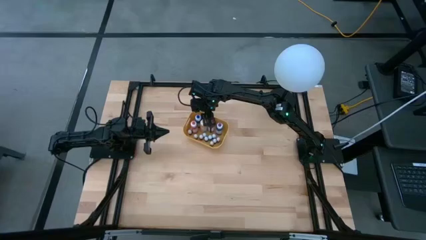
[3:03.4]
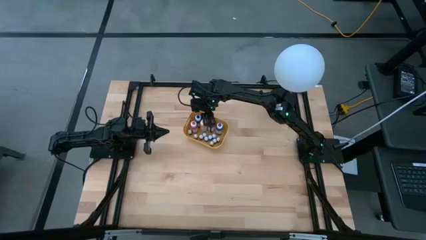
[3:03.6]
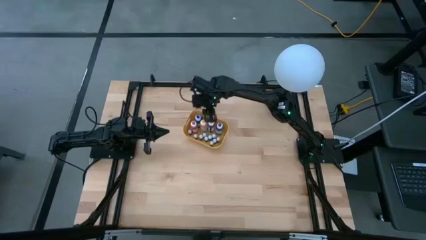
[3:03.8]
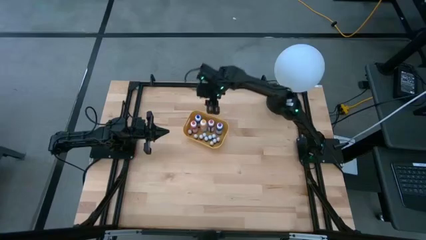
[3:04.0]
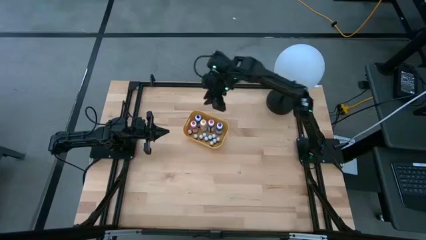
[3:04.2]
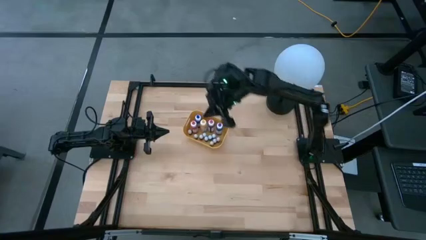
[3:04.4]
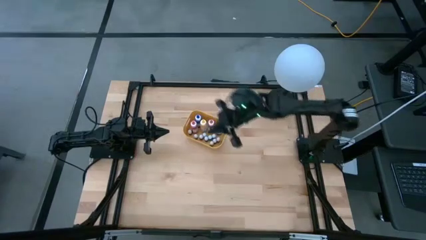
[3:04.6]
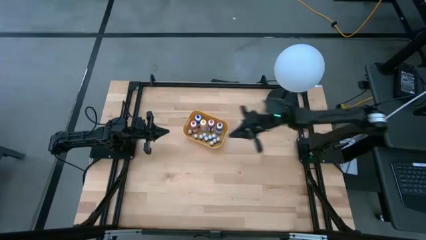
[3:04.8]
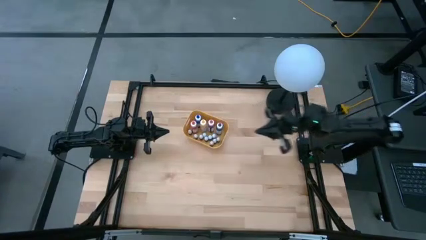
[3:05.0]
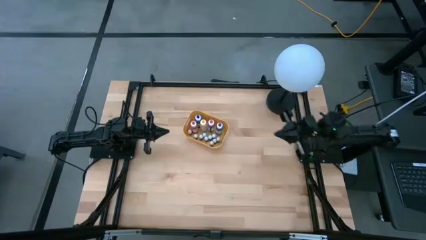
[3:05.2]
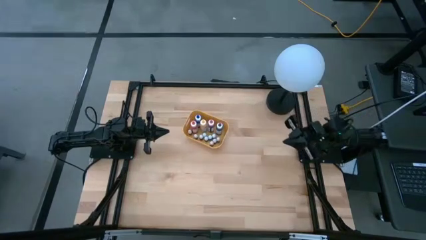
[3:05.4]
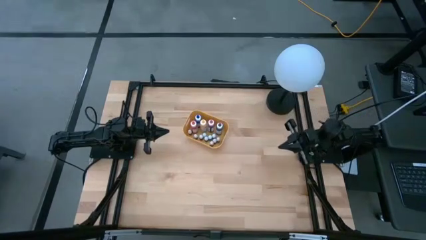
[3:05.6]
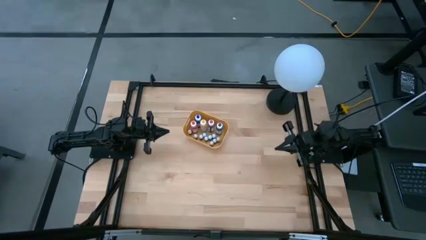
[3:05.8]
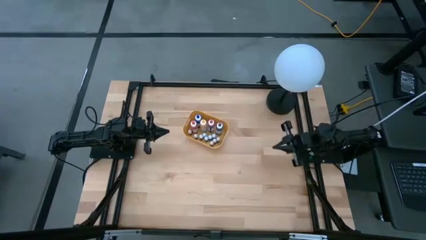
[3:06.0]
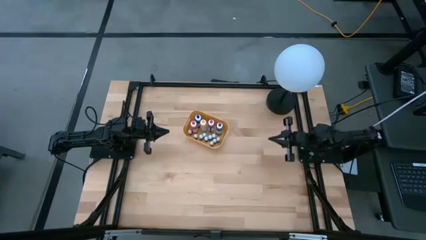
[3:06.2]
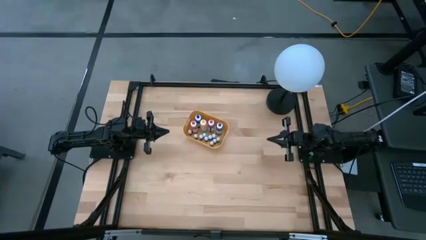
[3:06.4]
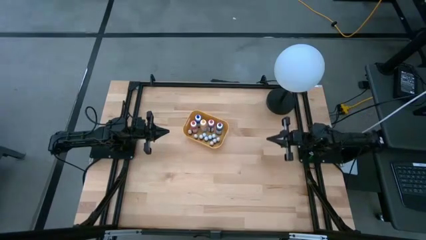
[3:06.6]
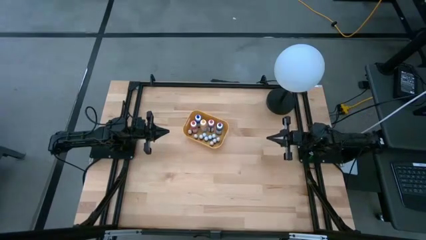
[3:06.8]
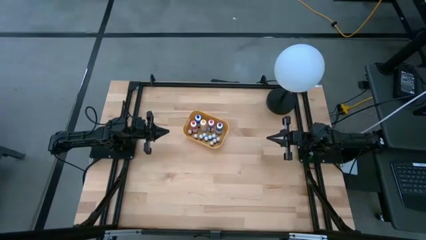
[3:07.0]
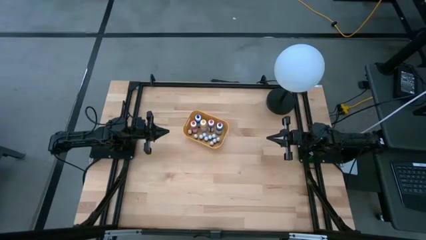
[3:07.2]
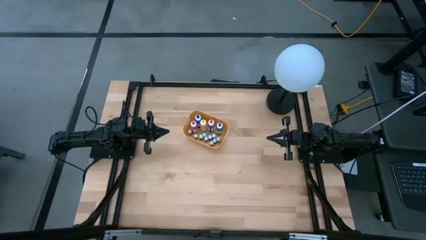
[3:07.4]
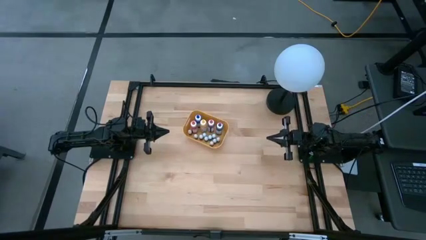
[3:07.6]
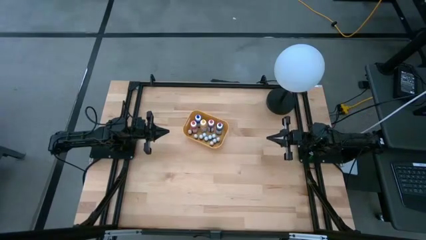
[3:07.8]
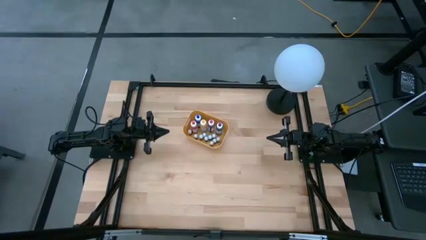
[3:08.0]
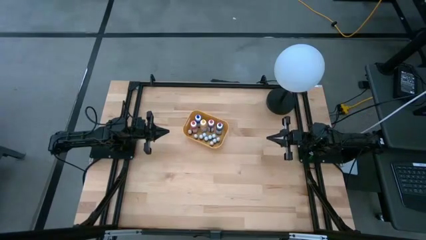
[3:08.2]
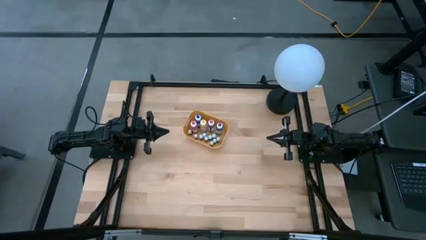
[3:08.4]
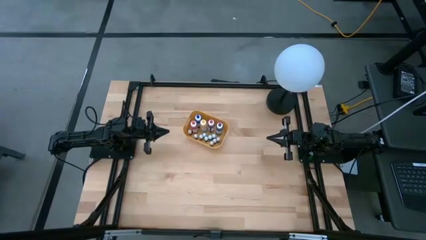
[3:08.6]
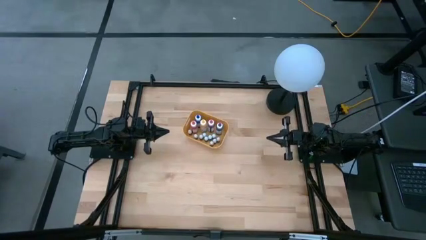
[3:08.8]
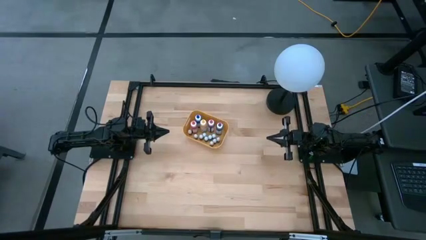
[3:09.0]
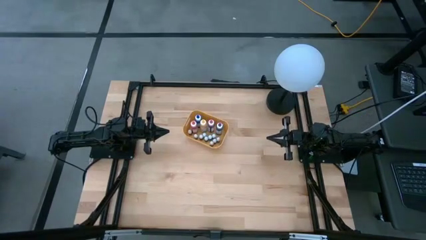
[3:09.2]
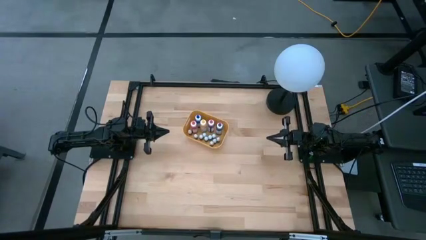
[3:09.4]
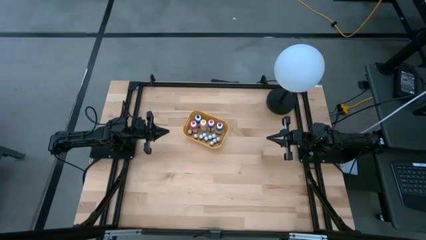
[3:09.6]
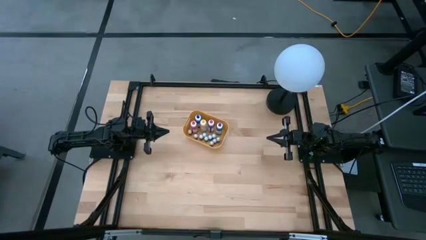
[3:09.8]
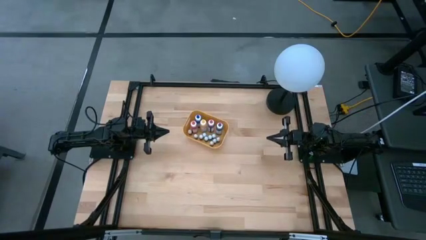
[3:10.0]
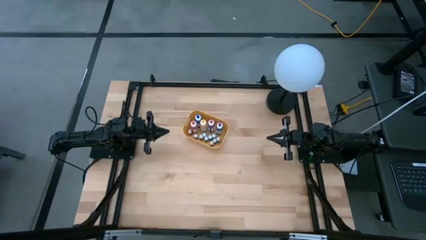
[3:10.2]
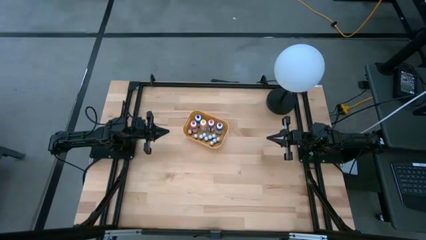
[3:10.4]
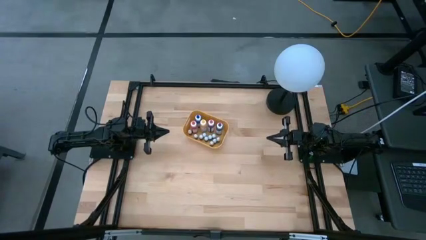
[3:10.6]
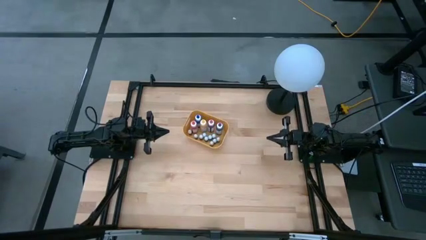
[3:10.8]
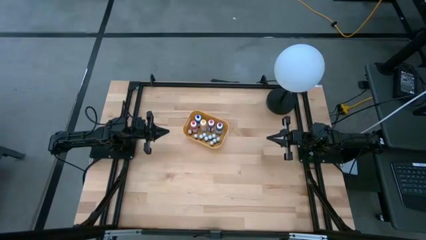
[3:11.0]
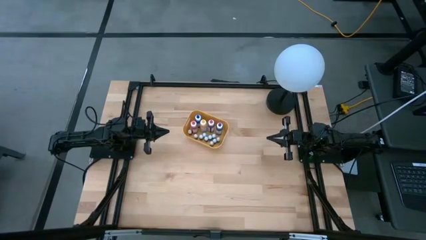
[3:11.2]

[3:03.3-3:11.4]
Task: Pick & Place food coloring
Return to Home Position

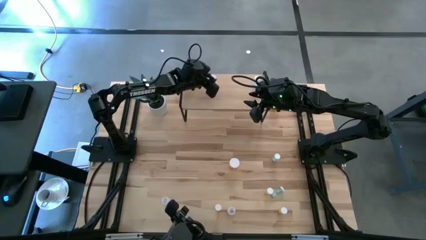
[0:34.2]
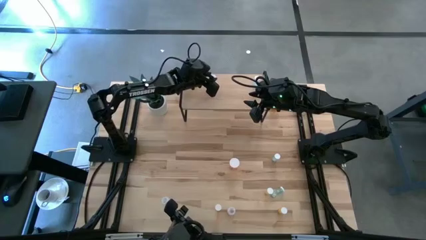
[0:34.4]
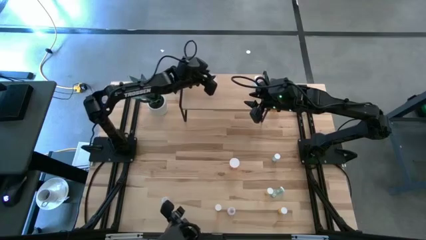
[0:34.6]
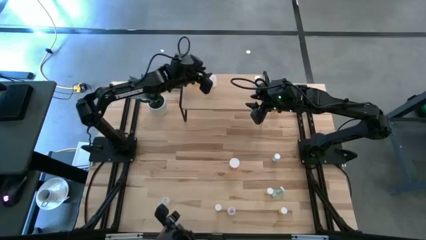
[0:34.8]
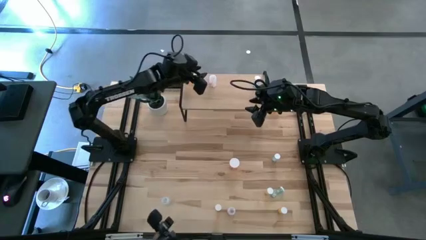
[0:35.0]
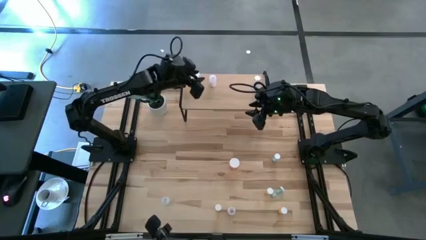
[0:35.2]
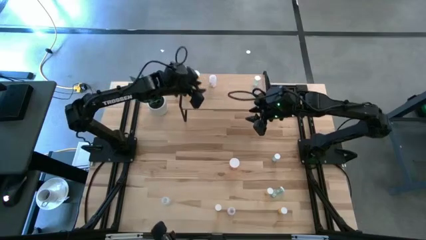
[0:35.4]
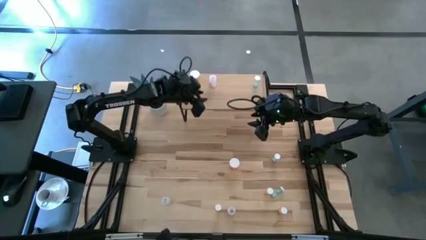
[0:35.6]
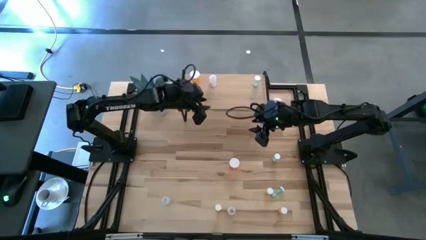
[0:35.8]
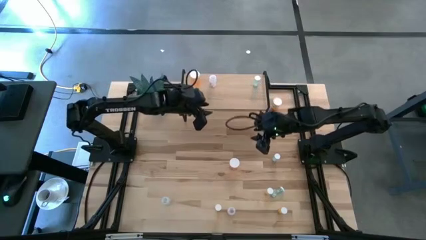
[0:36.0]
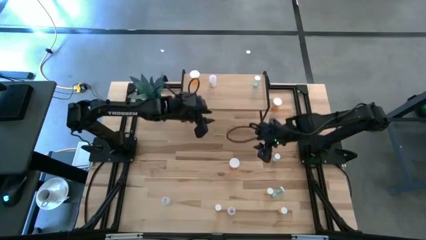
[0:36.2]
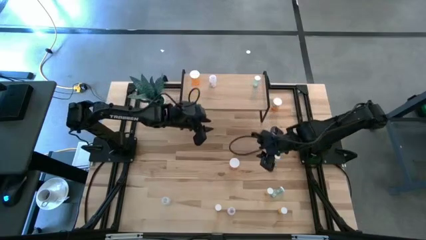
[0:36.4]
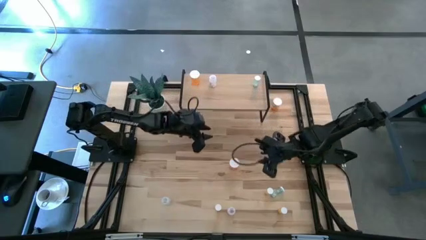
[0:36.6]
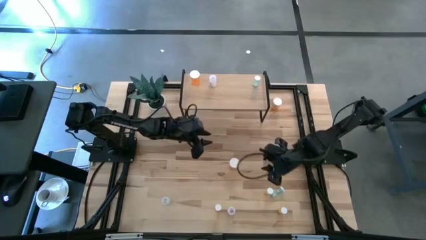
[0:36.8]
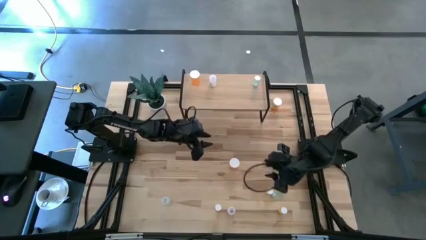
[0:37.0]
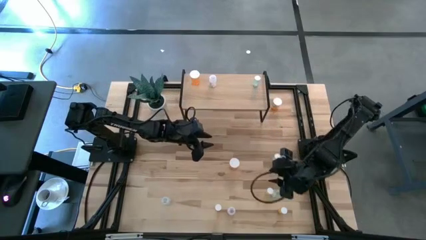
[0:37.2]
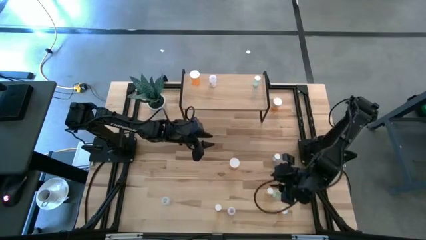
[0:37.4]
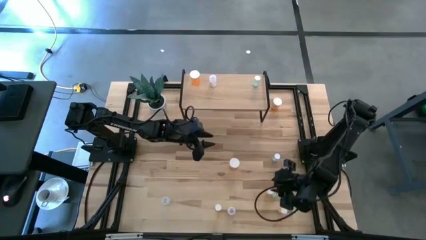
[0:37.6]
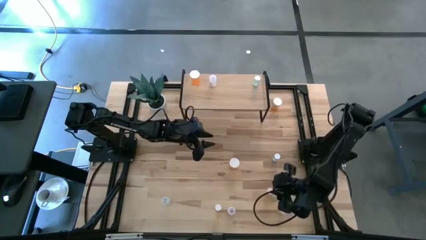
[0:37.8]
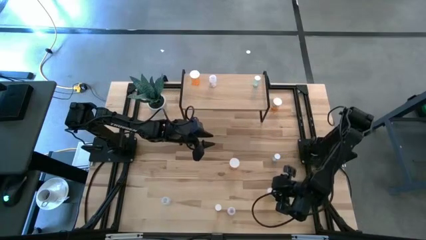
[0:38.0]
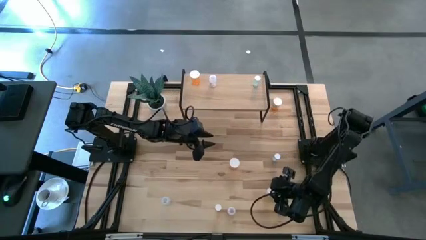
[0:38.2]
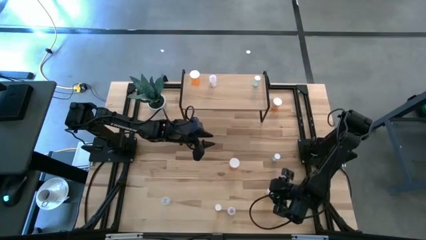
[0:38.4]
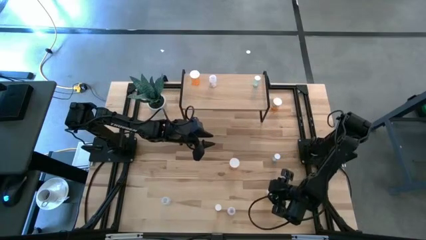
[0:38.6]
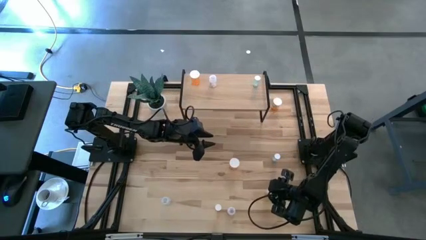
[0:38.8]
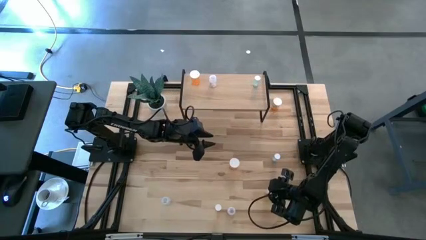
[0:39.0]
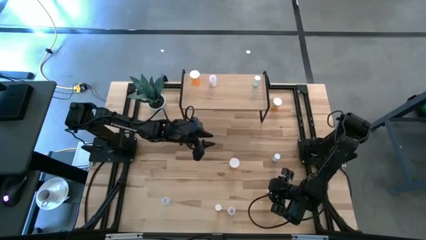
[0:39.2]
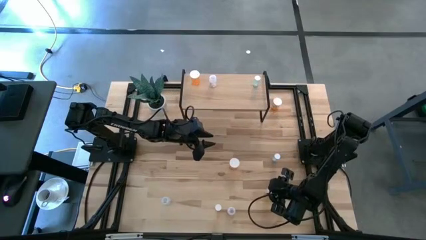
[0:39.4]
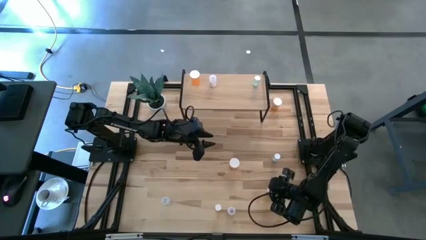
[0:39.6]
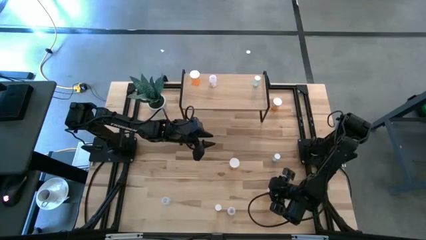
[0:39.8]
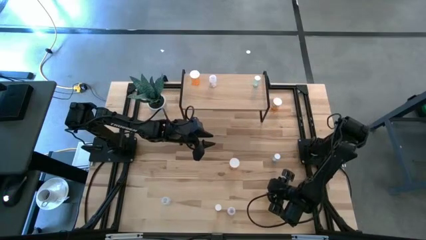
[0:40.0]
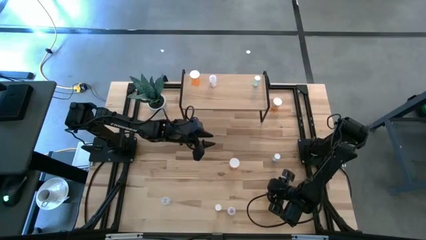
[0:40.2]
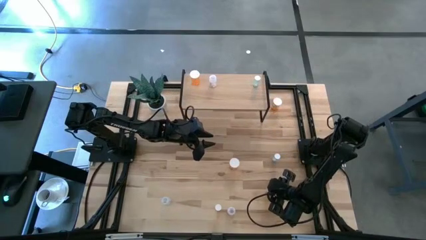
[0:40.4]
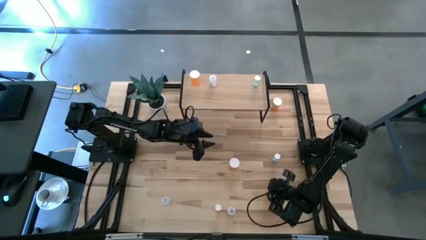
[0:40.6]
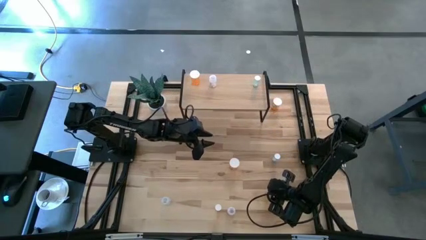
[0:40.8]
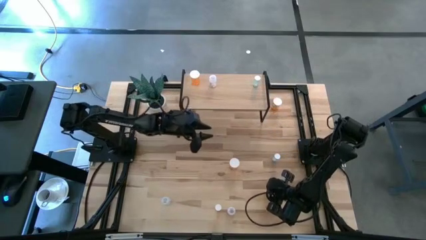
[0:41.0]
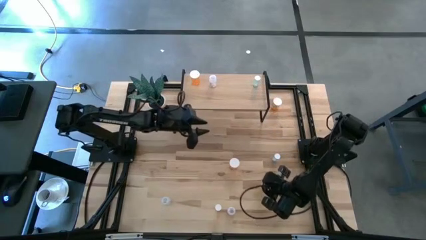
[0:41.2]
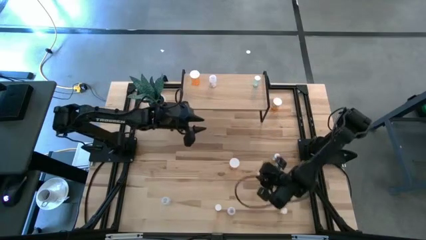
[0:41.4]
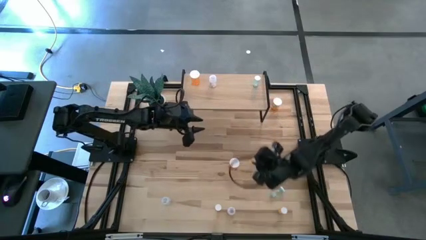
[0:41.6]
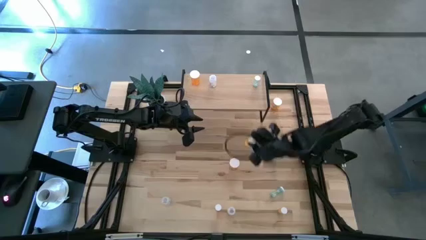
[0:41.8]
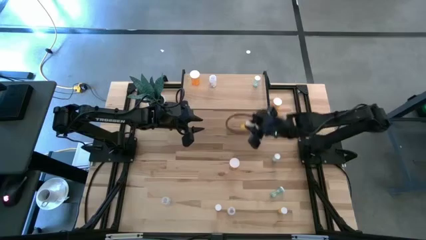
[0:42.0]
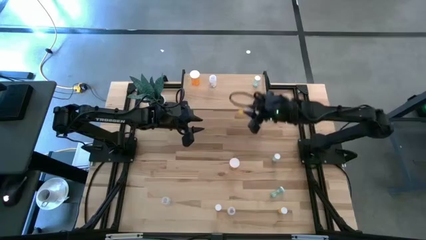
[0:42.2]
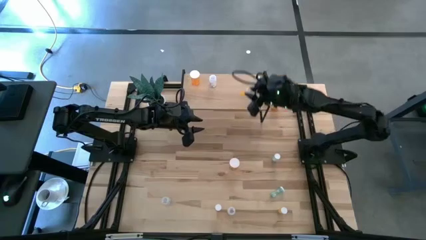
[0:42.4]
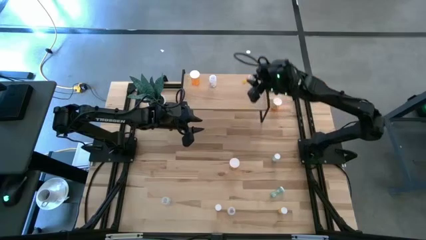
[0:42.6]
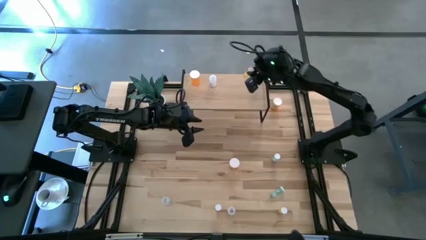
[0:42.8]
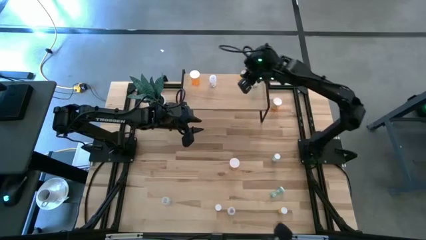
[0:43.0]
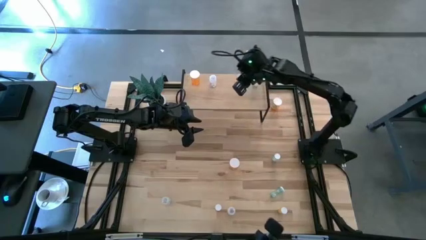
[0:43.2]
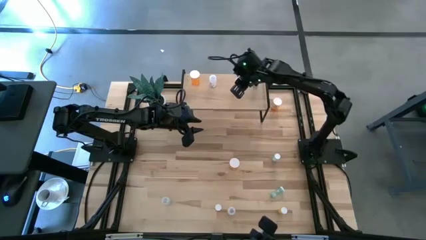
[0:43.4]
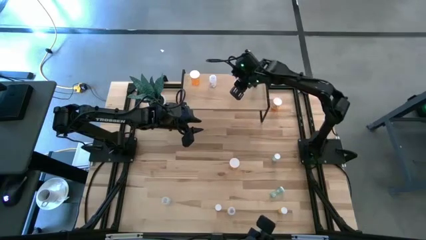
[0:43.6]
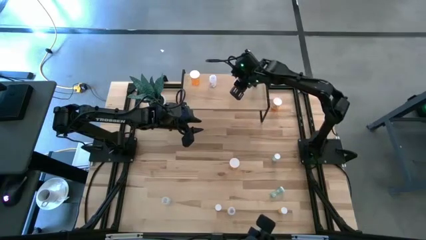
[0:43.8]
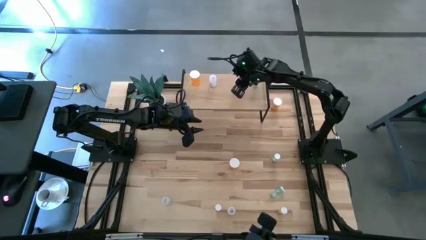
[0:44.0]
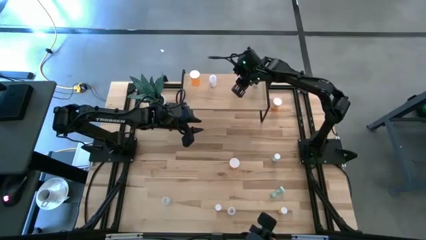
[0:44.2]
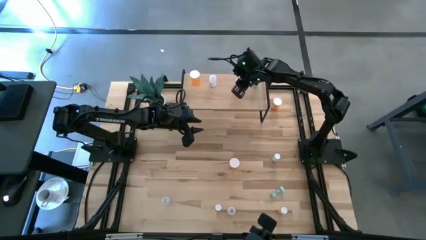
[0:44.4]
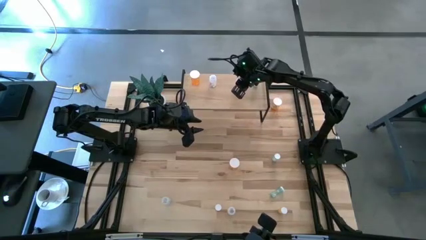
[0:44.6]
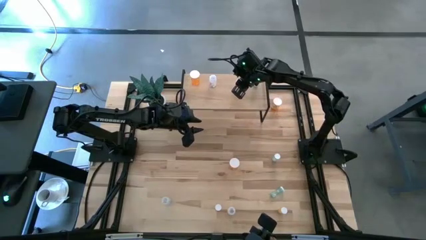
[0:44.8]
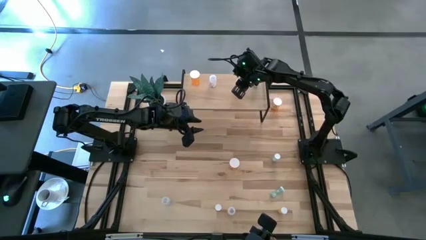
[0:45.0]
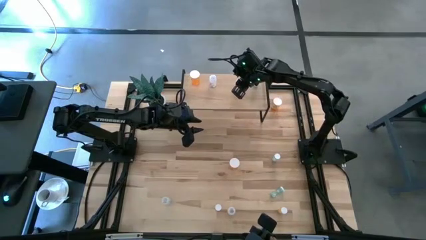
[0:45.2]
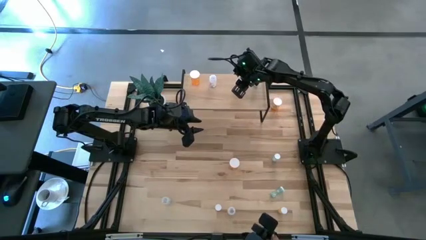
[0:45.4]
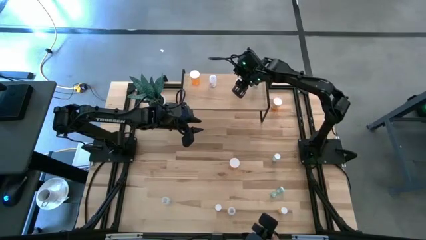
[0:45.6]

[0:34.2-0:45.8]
Task: Pick and place medicine bottles onto shelf by color
Put the top small orange pill bottle on the shelf
